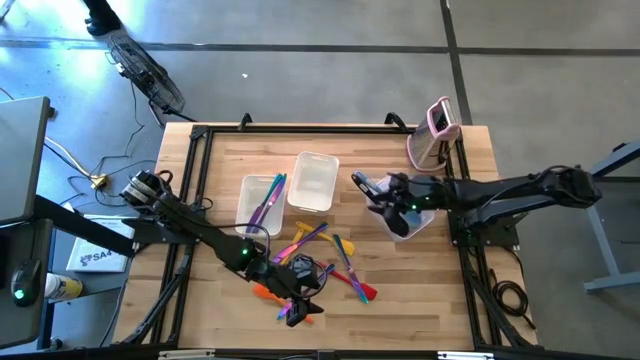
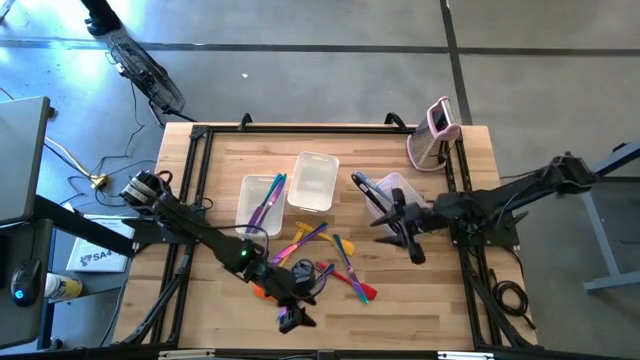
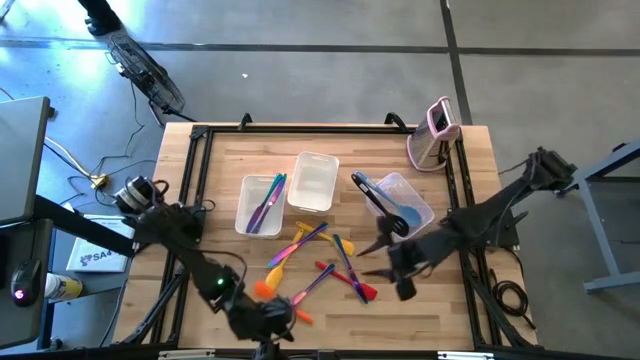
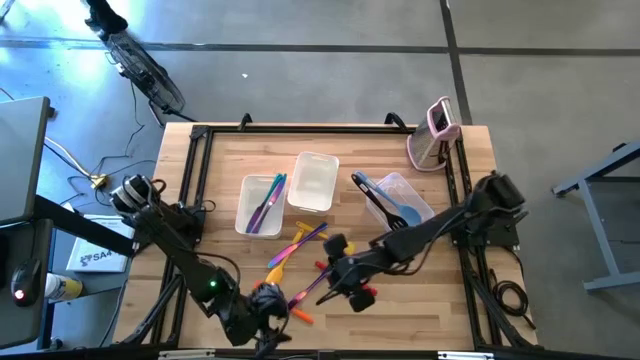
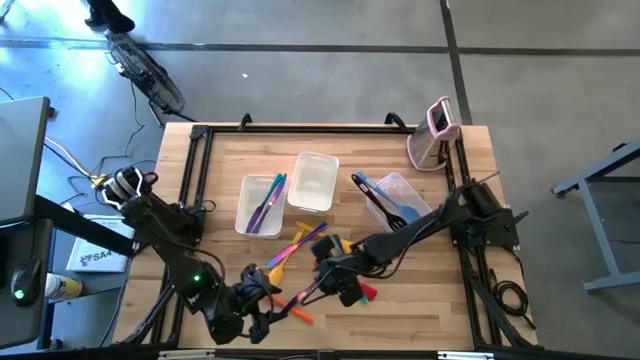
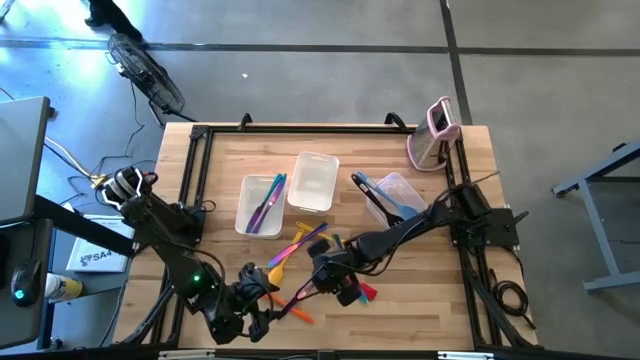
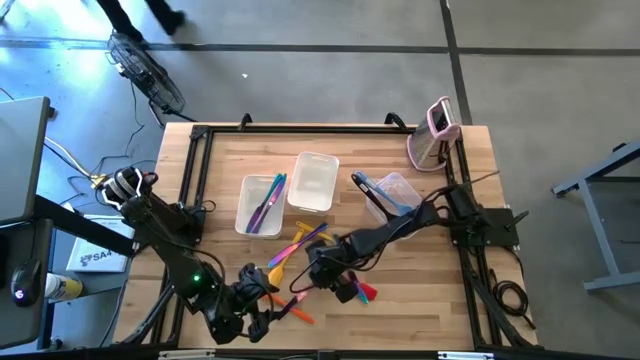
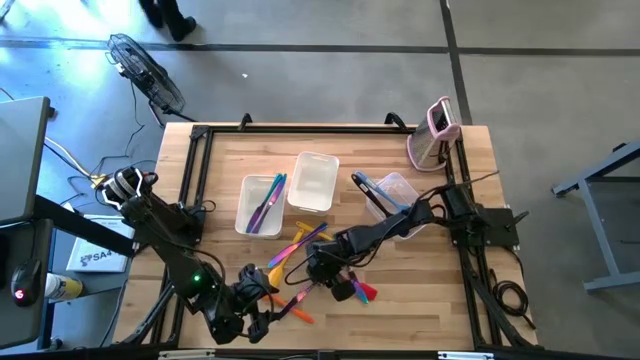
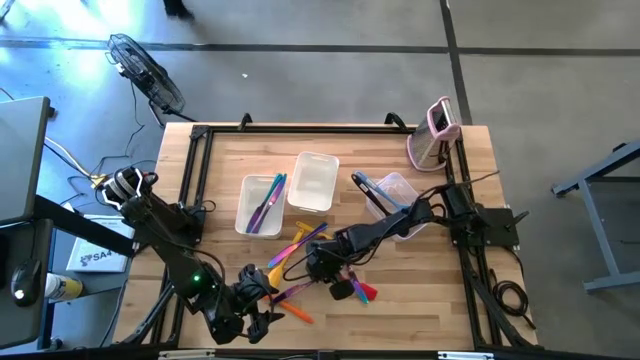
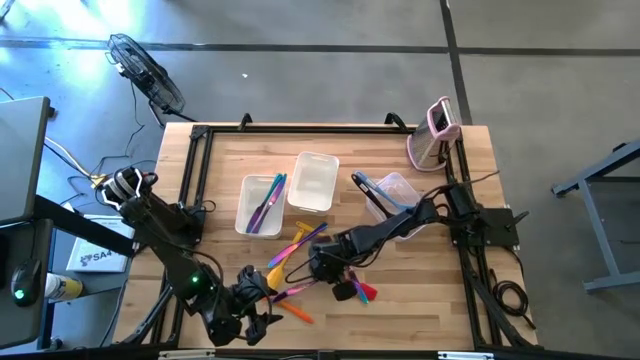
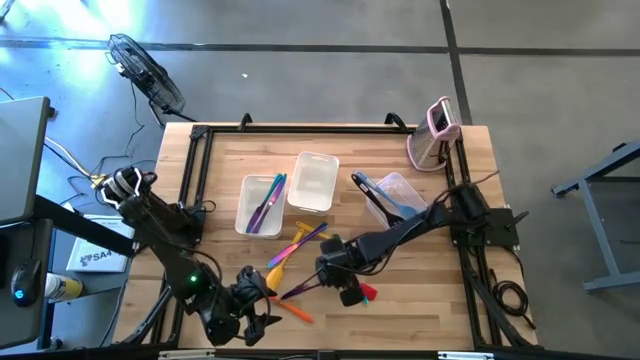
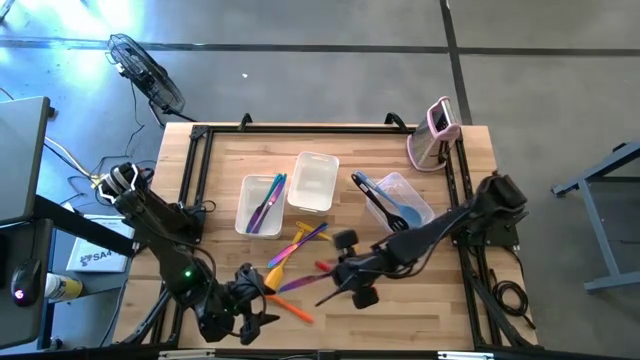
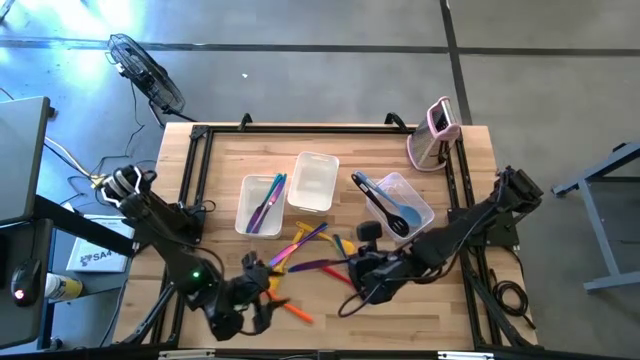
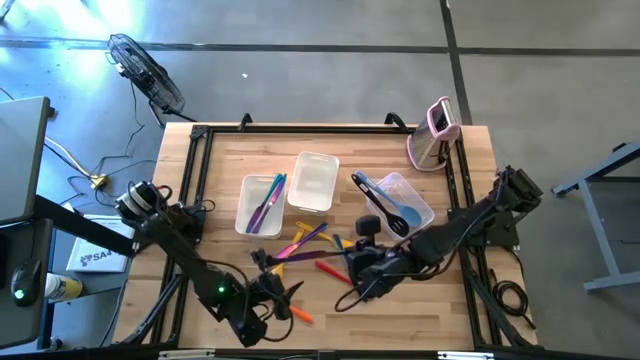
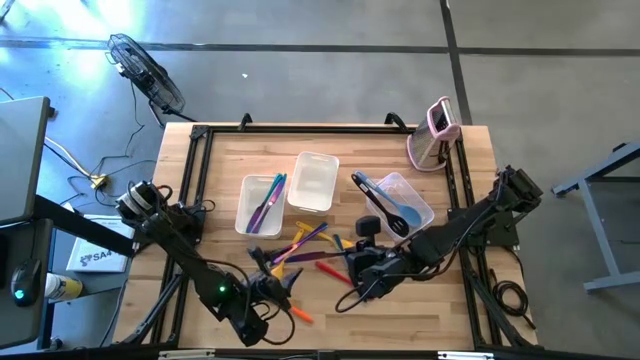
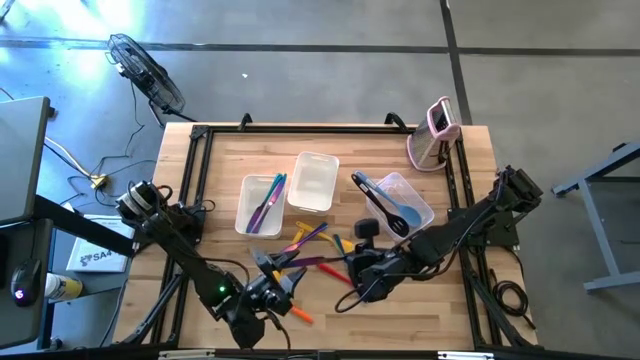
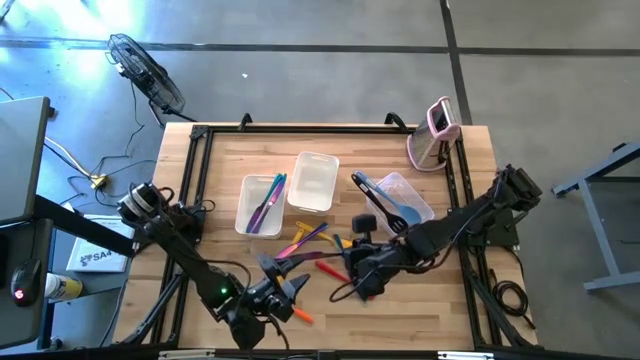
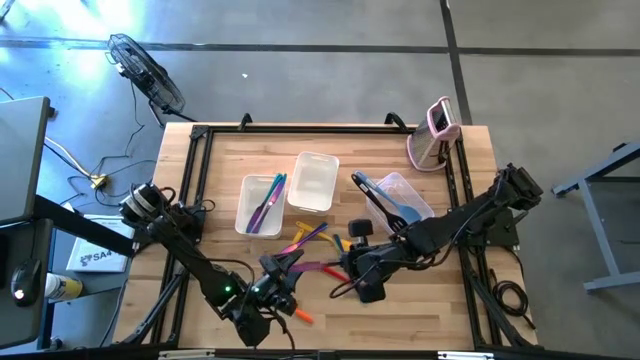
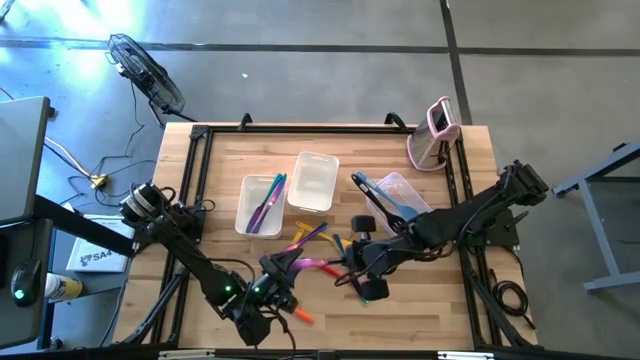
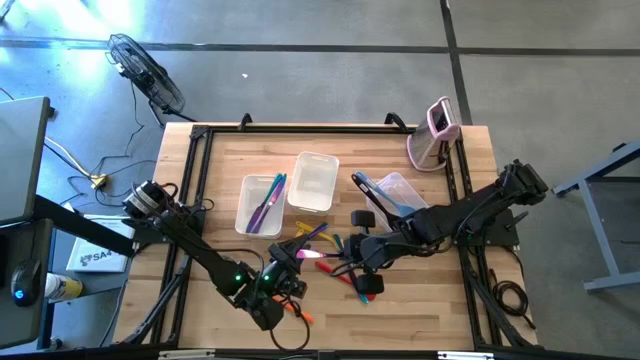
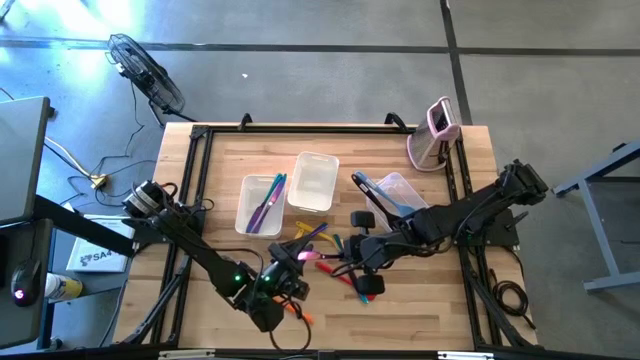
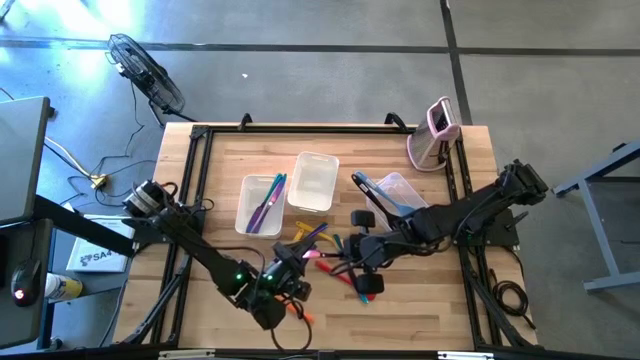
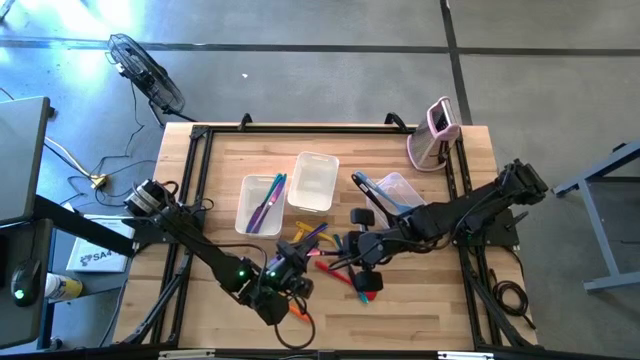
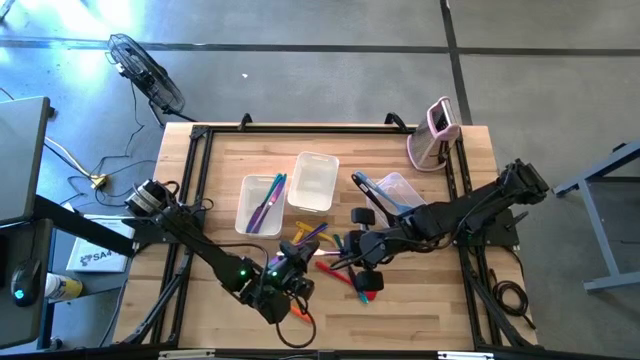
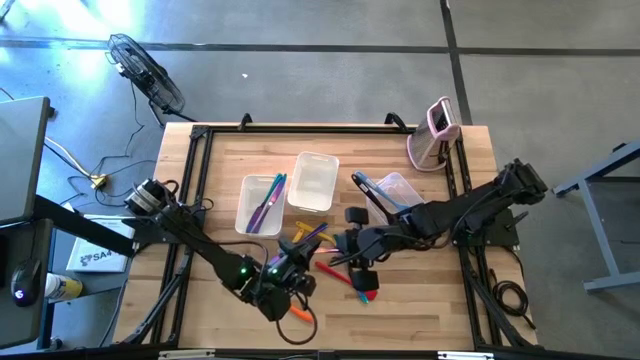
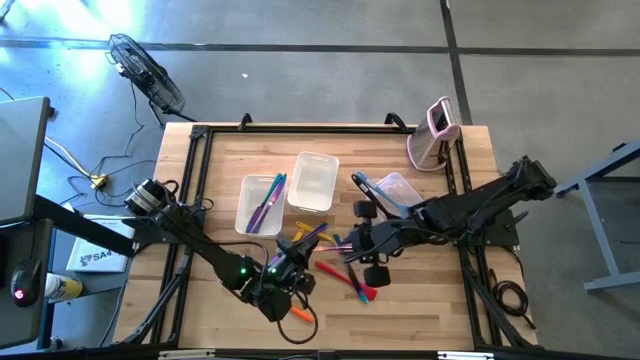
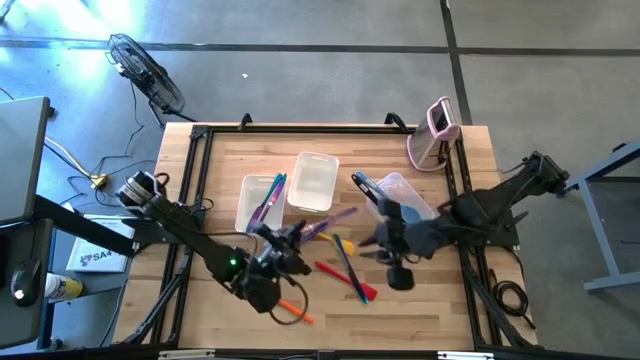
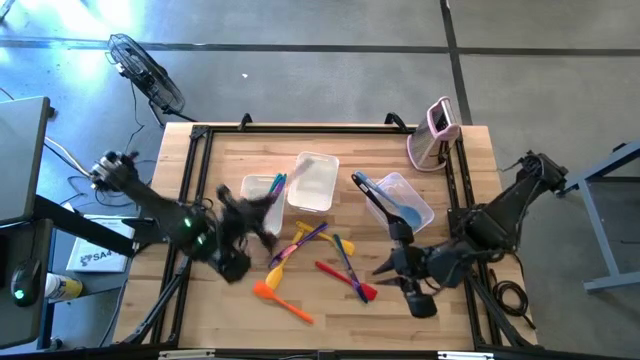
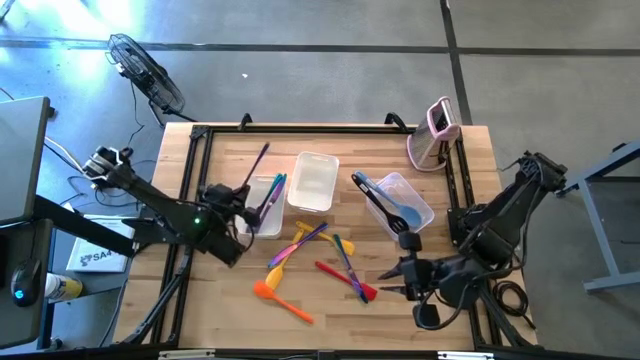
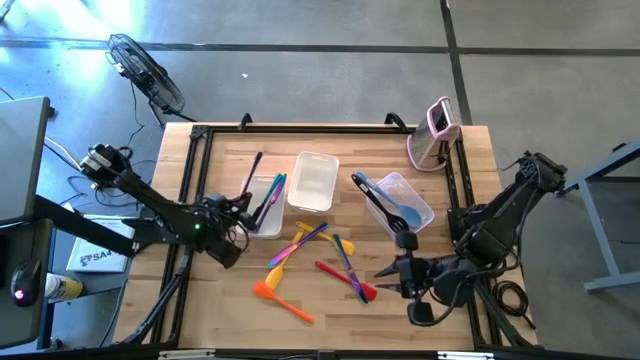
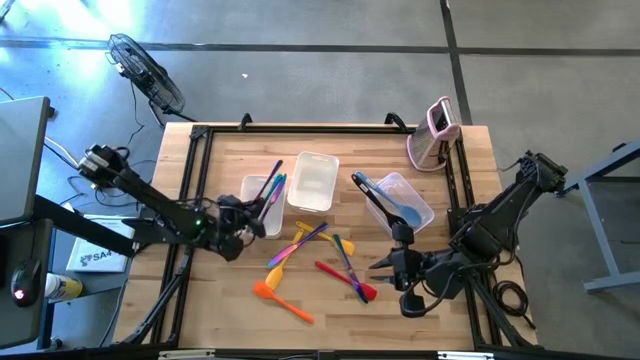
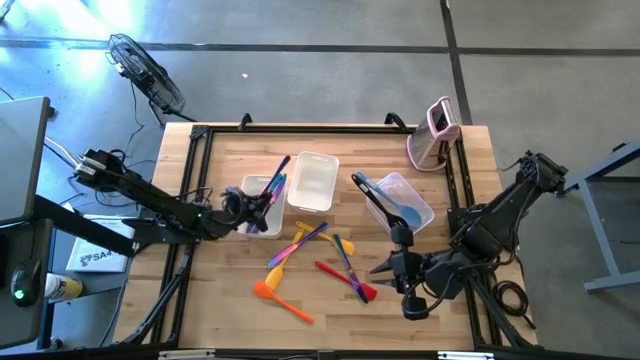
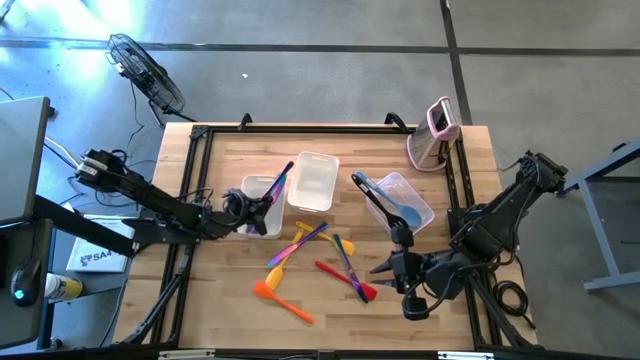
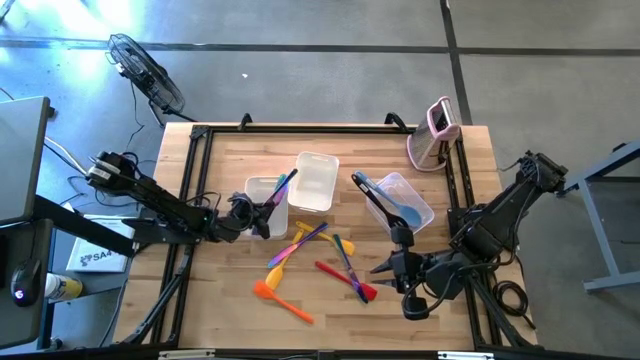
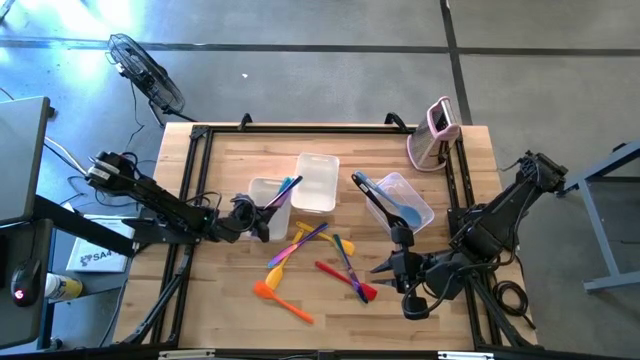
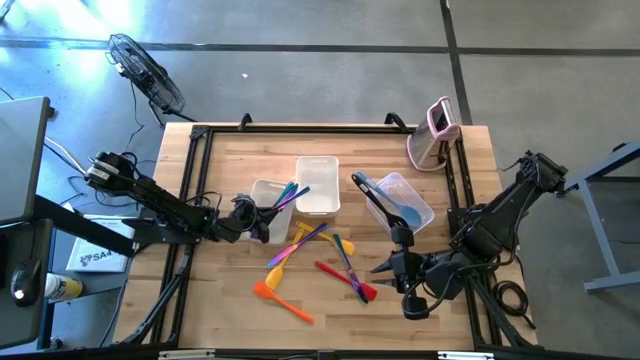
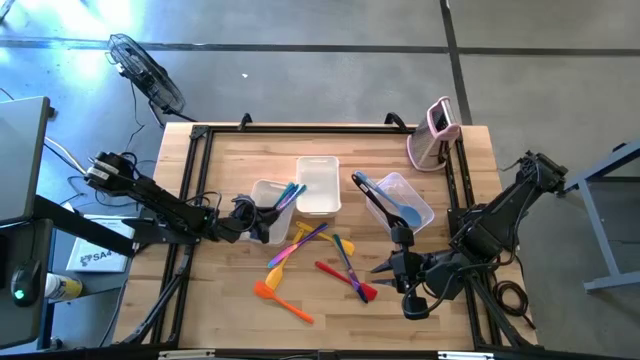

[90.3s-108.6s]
Task: Pick & Place Kitchen Items
Put the blue table knife into the left white bin

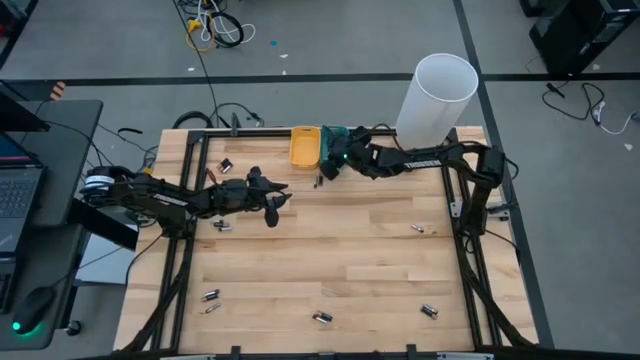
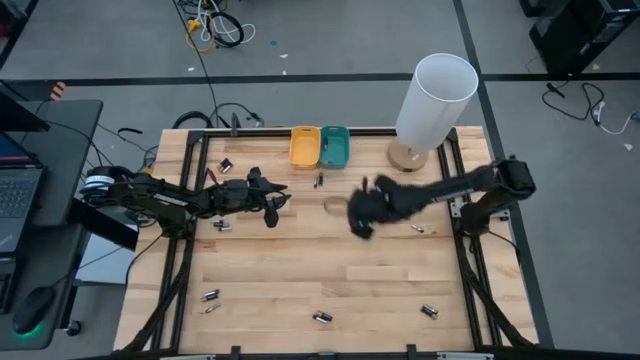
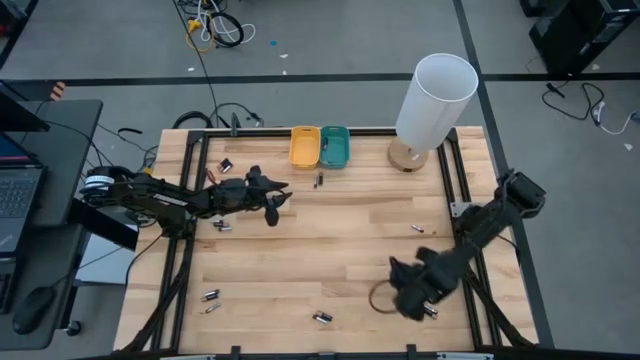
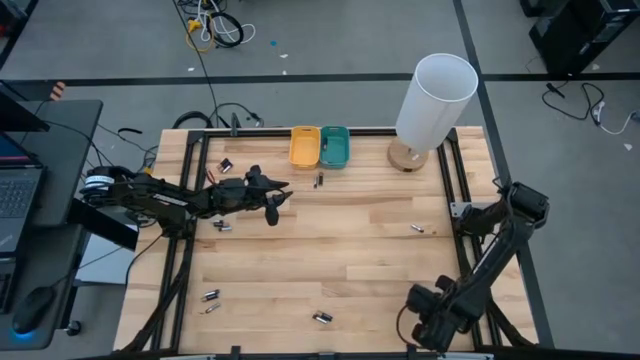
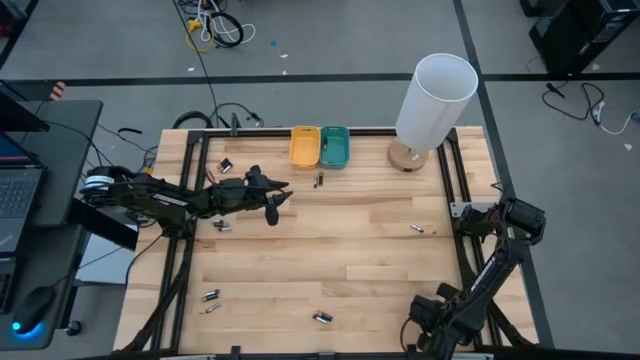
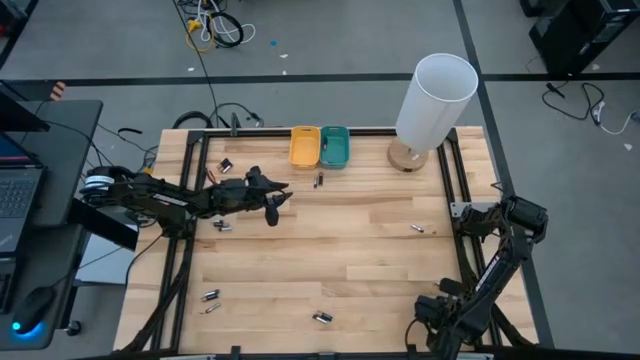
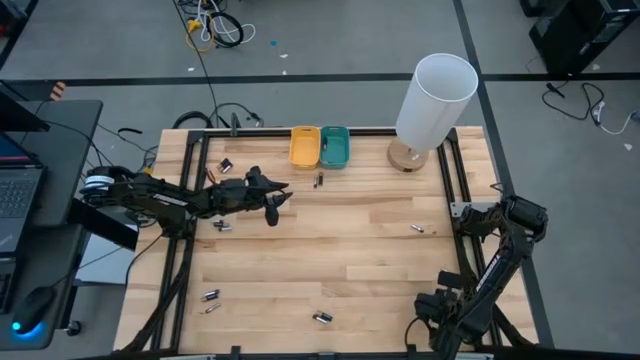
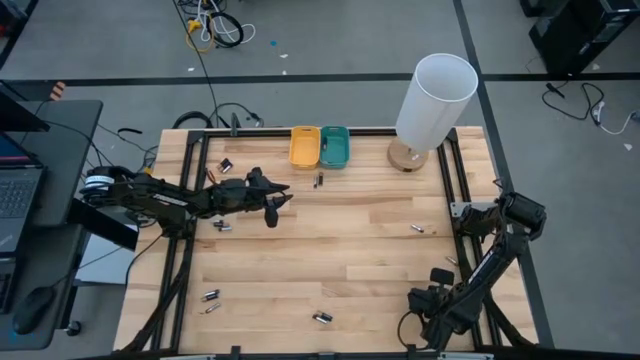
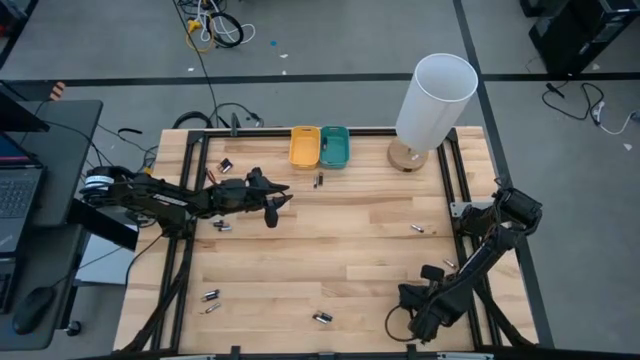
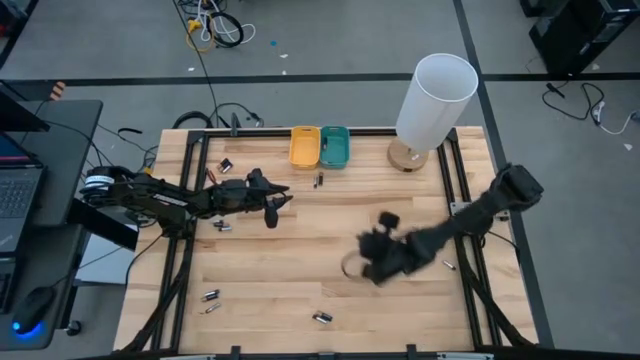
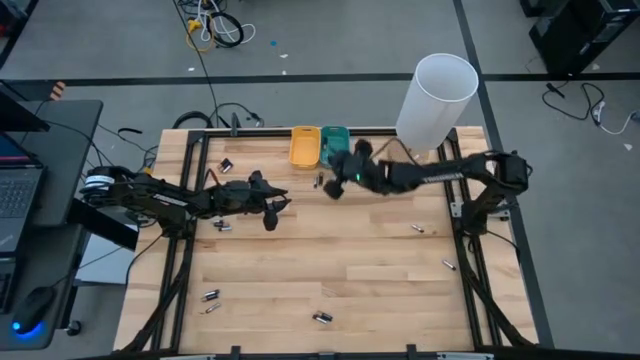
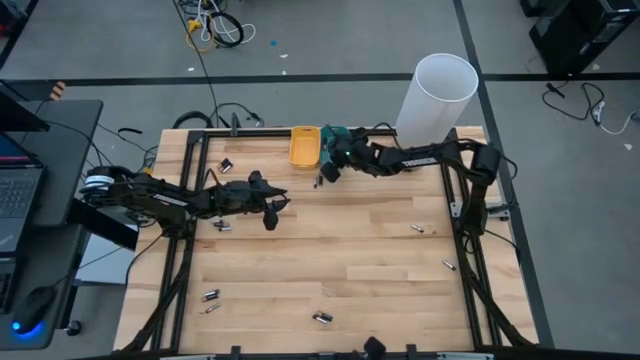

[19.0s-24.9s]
Task: Sort batteries
Put the black battery into the green bin
